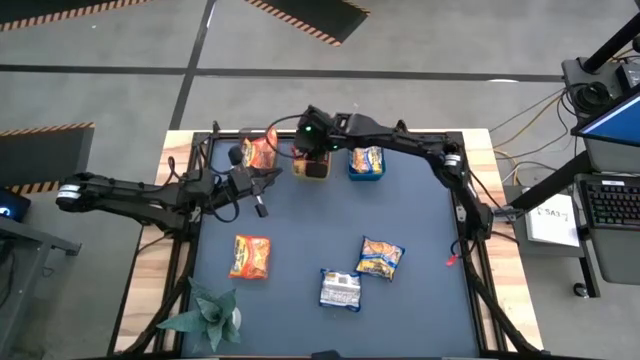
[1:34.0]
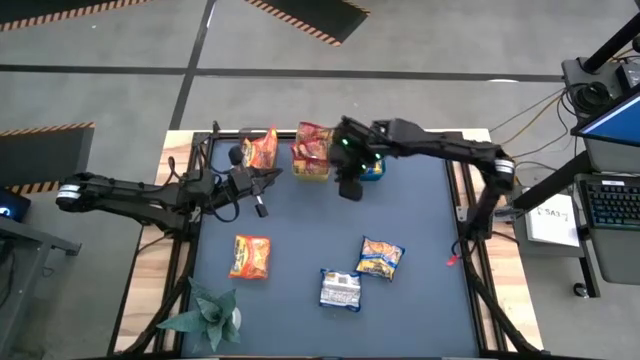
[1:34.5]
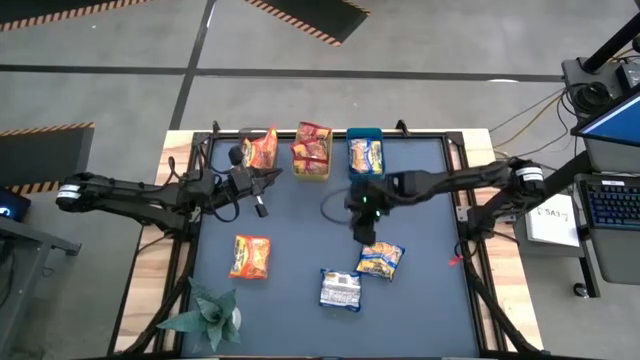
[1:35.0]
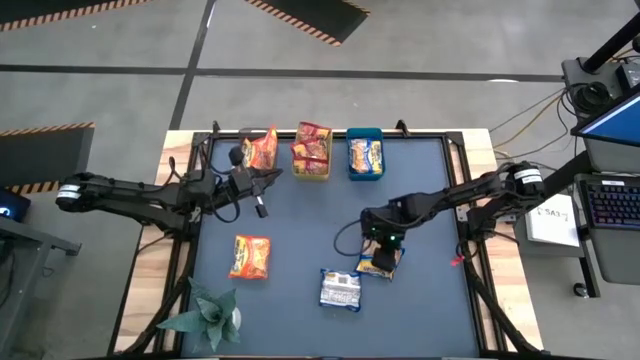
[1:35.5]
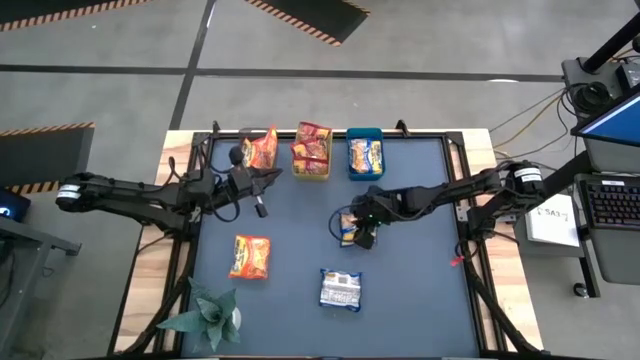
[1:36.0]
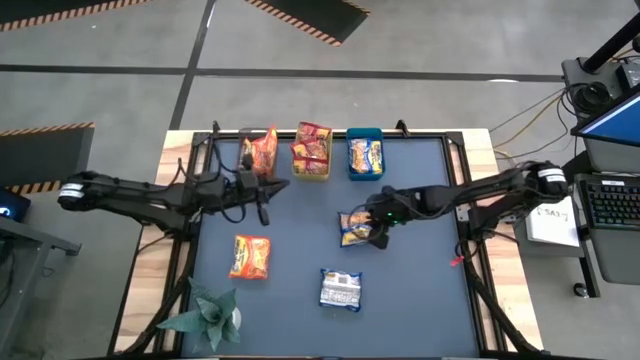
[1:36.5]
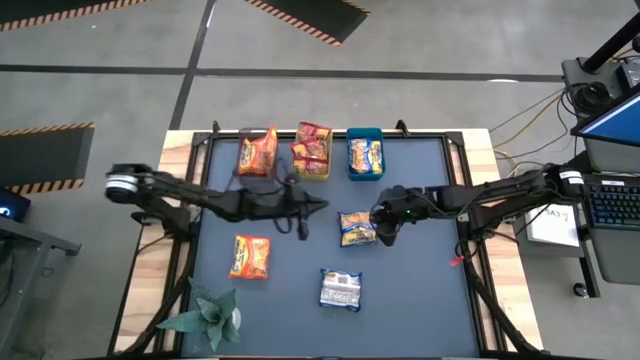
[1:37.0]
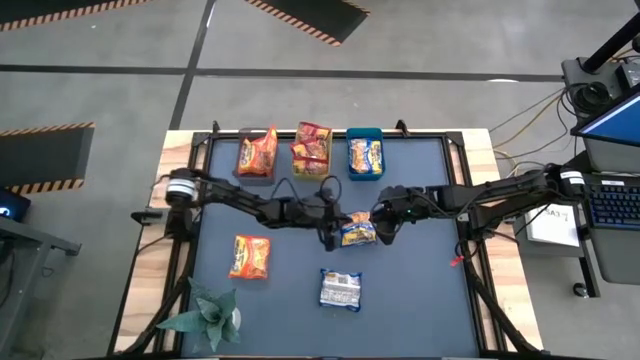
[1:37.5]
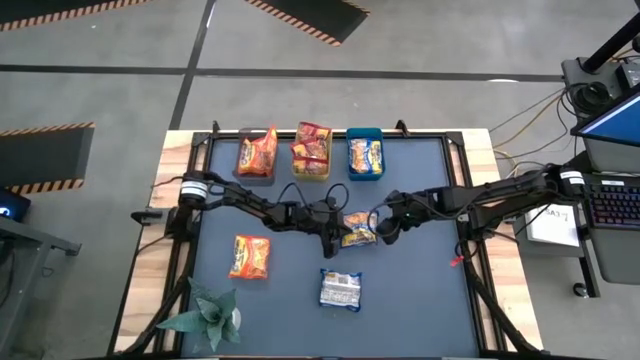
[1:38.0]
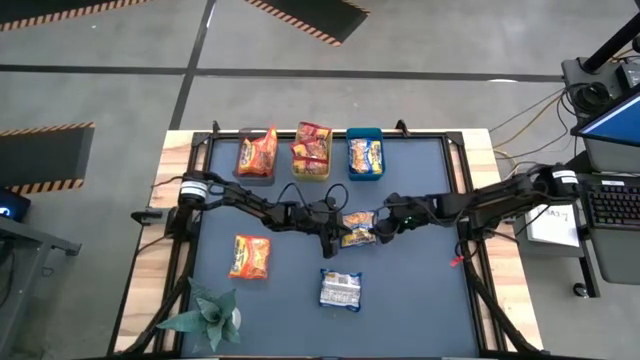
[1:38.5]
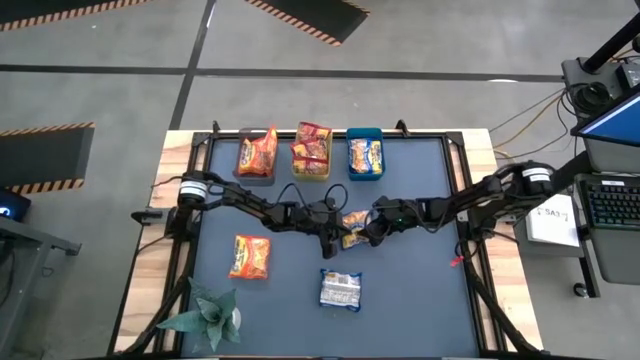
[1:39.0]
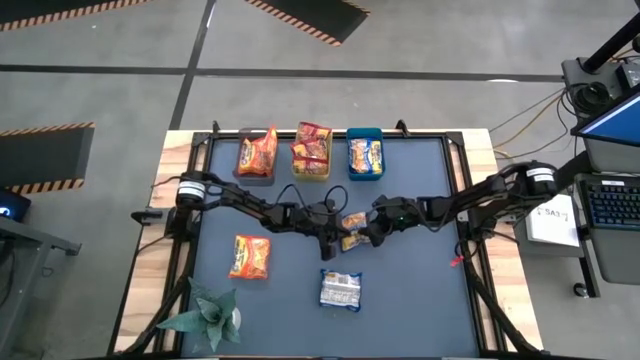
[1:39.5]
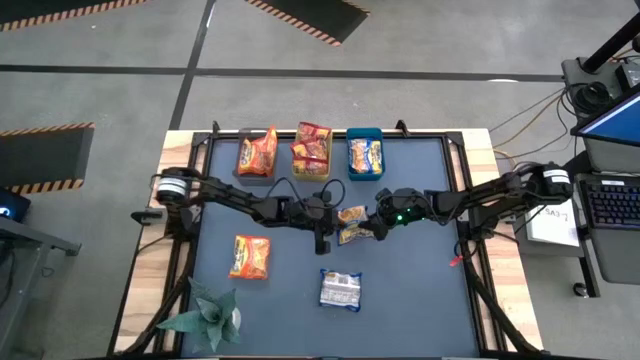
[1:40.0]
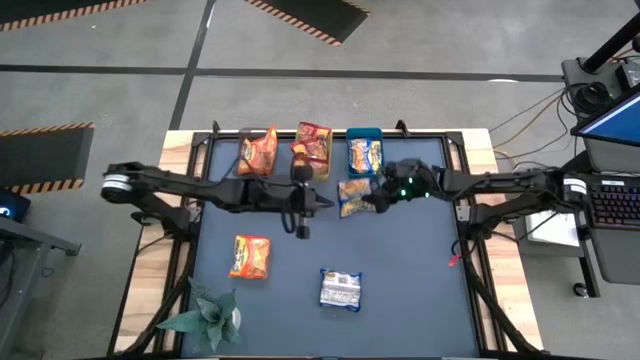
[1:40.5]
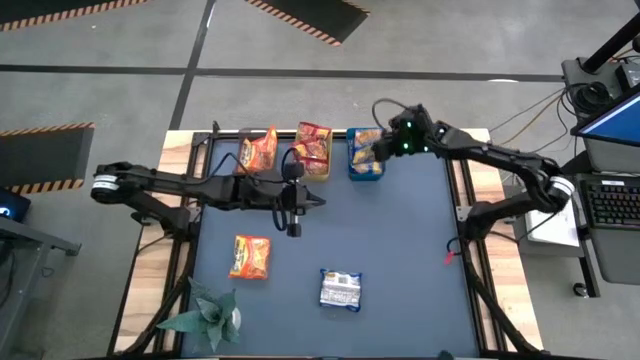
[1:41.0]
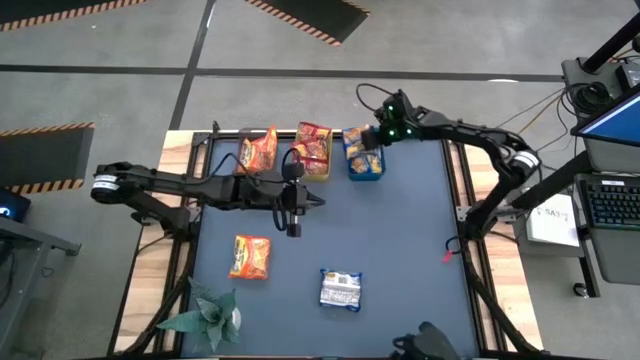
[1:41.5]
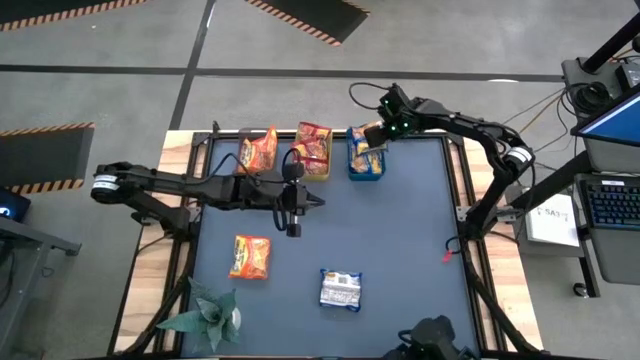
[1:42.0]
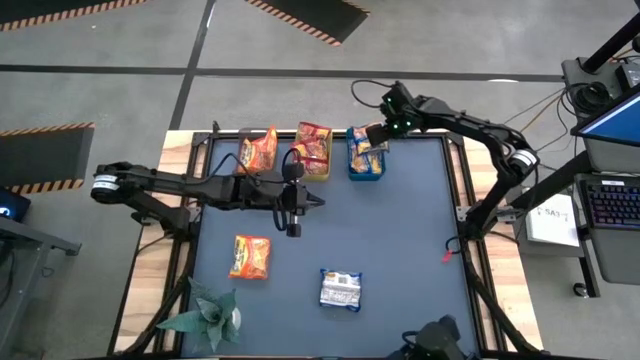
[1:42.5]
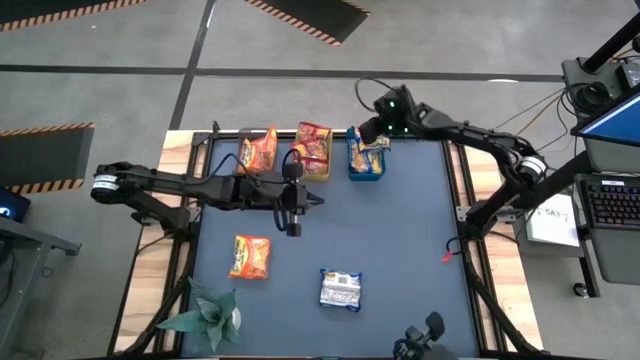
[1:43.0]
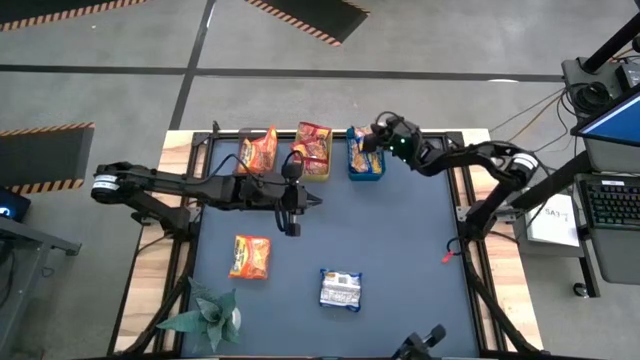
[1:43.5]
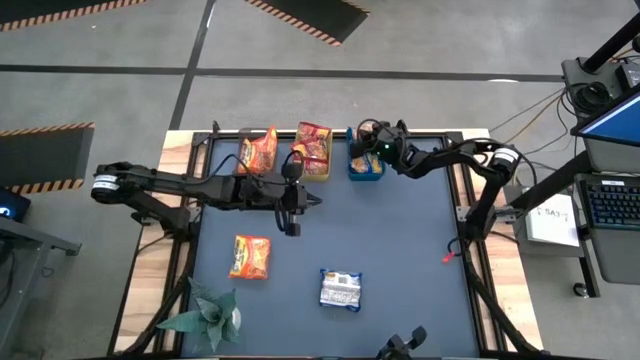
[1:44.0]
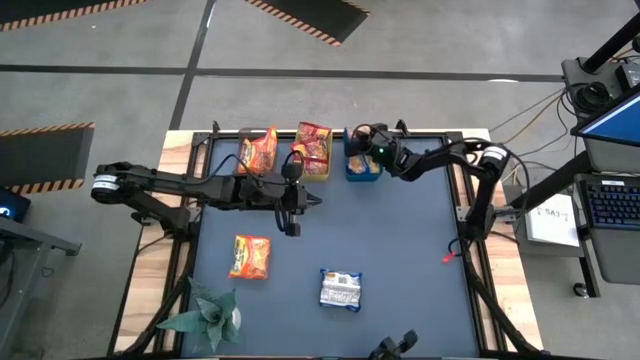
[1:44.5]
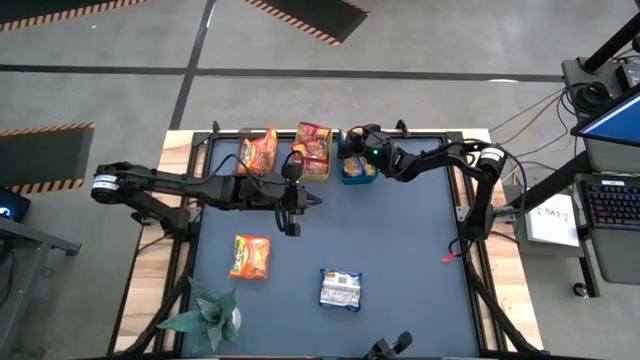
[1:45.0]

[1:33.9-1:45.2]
Task: Sort Maruchan noodles
Put the blue noodle pack into the blue bin

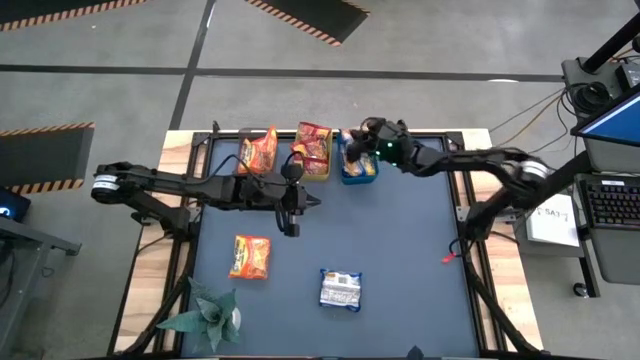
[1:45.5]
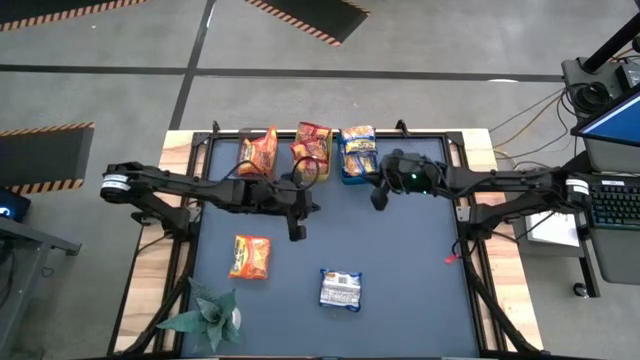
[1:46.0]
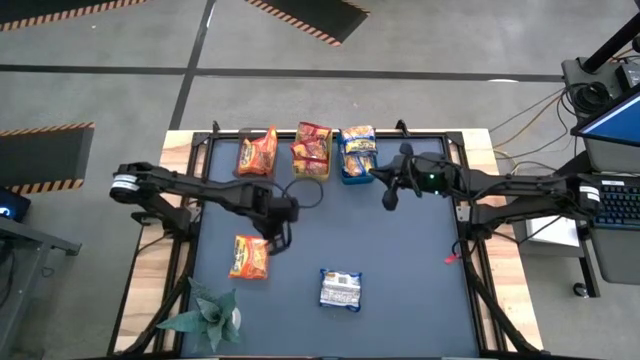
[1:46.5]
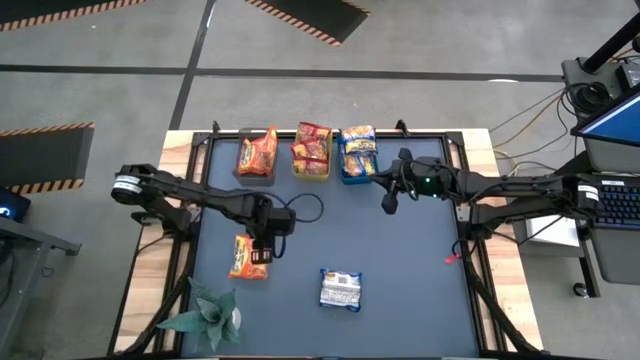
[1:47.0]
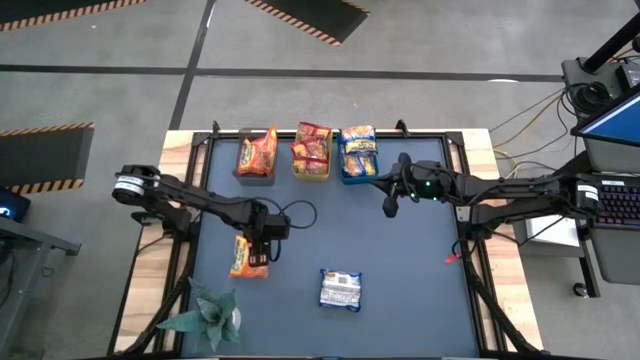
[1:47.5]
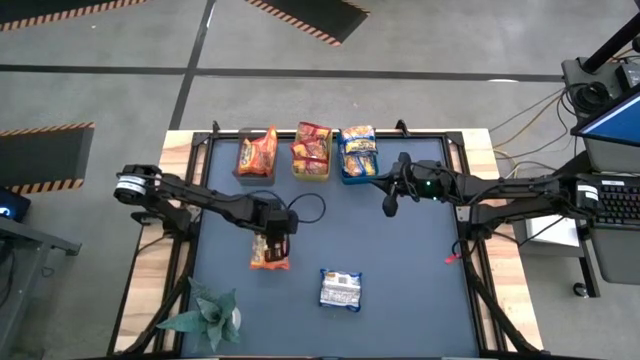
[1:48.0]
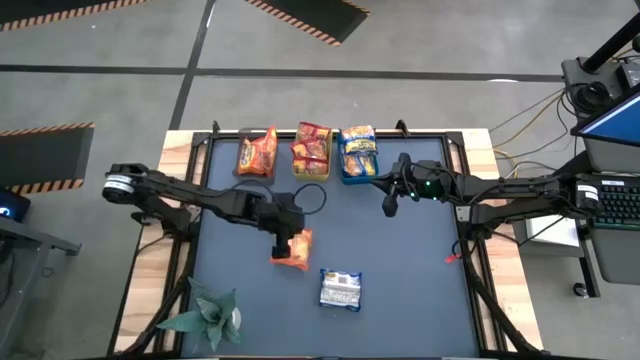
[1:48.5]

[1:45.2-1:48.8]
Put the orange noodle pack into the black bin

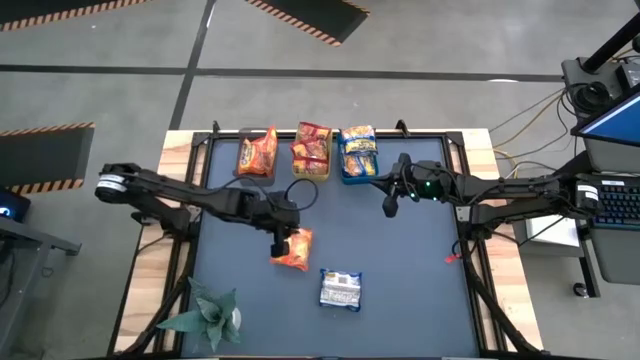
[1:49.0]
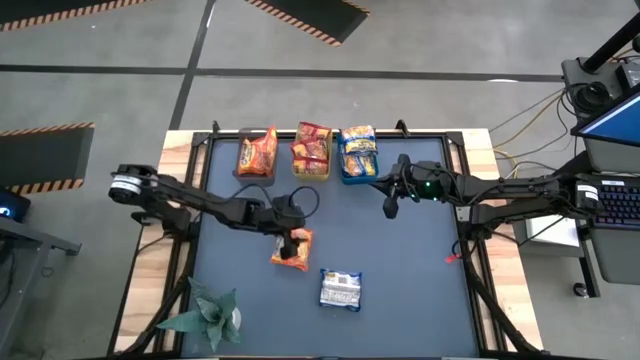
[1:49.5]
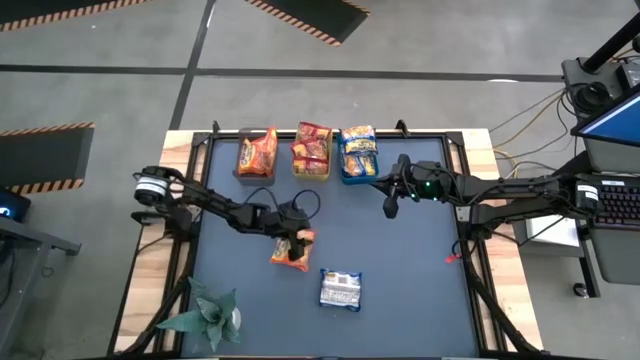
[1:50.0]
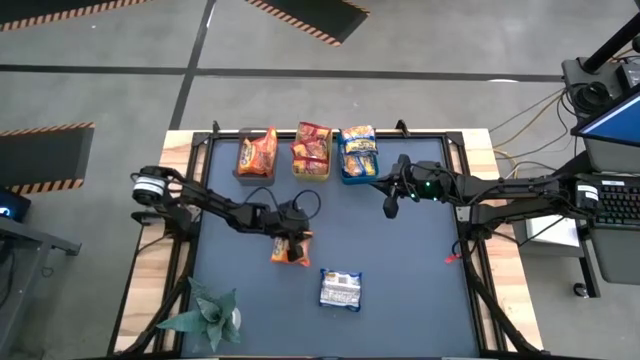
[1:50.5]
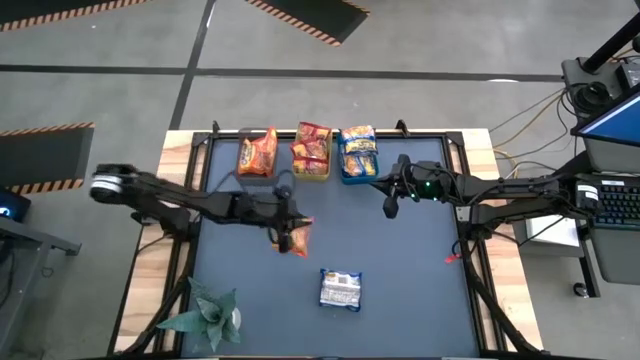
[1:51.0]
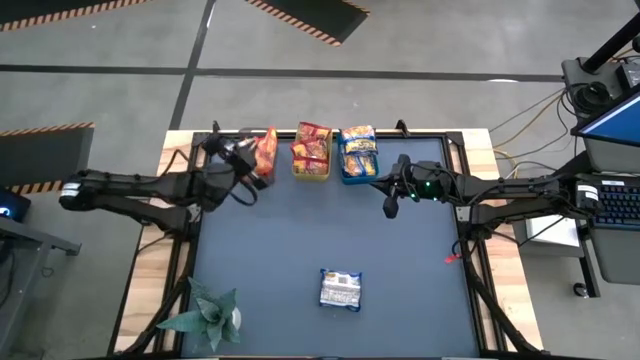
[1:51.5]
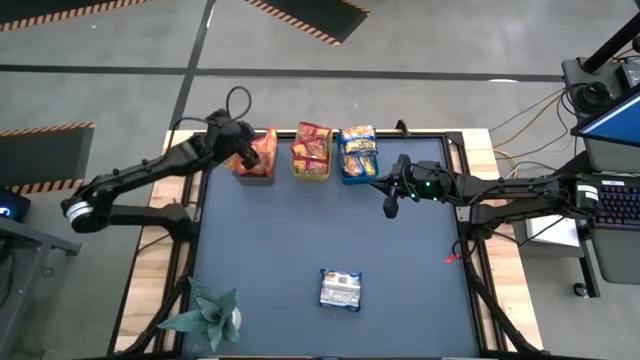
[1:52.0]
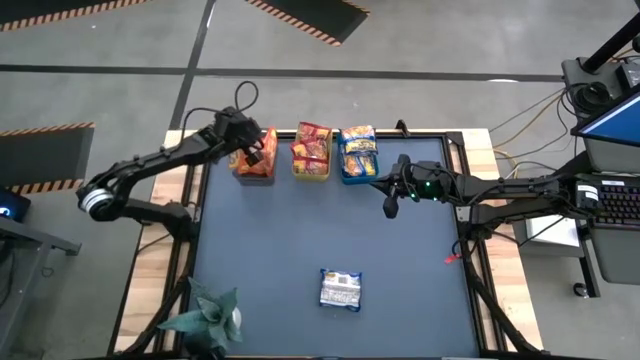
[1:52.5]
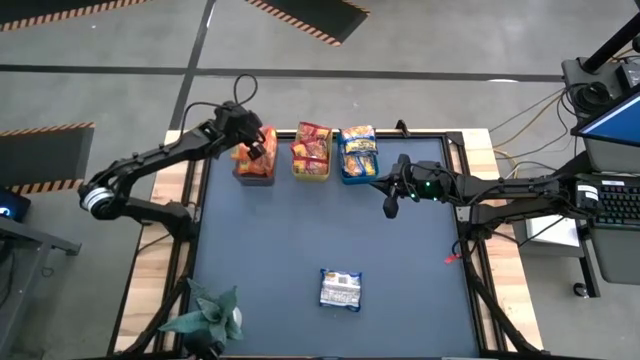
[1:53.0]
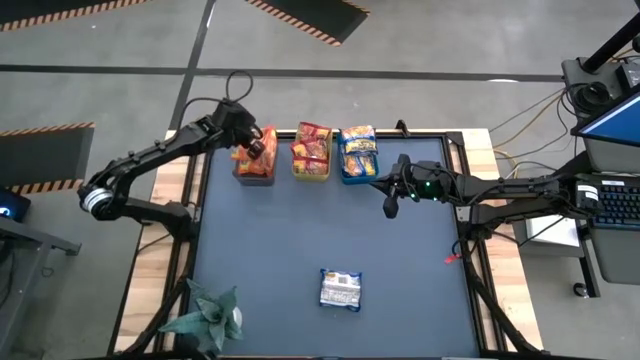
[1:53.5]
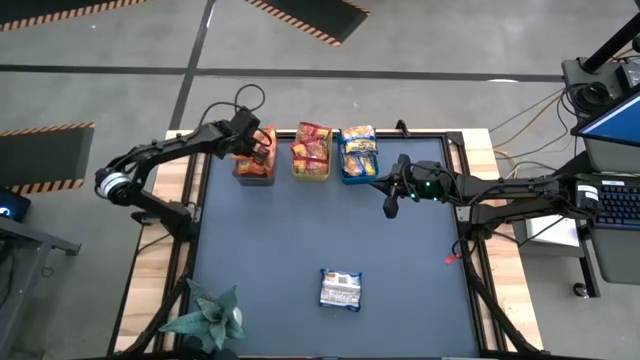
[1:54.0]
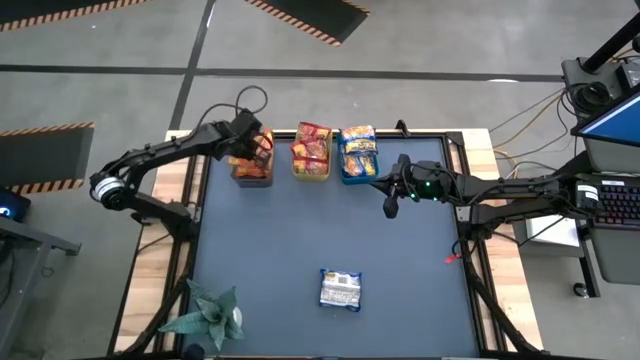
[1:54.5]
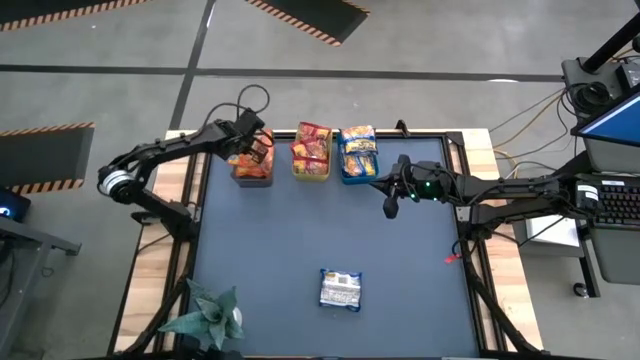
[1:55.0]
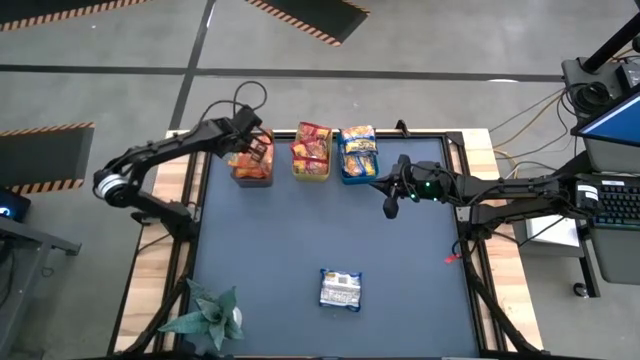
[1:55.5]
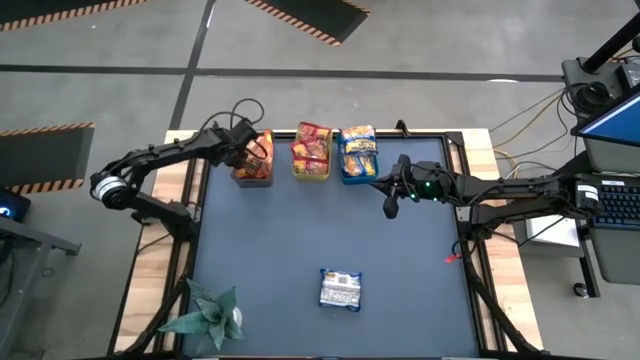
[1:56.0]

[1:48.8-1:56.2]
Put the orange noodle pack into the black bin
